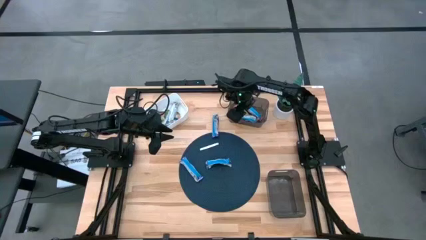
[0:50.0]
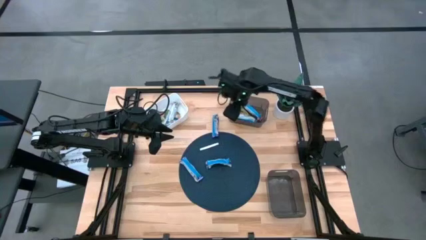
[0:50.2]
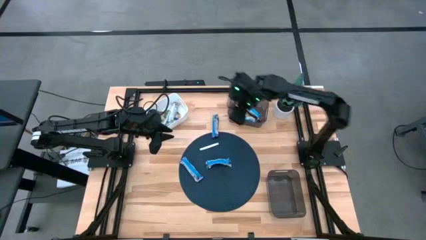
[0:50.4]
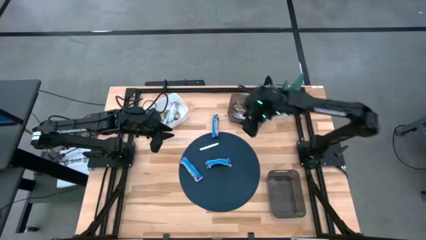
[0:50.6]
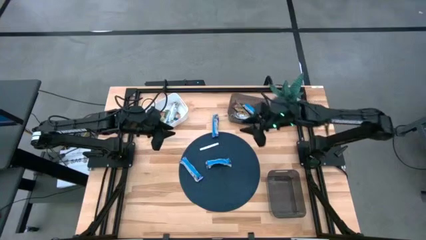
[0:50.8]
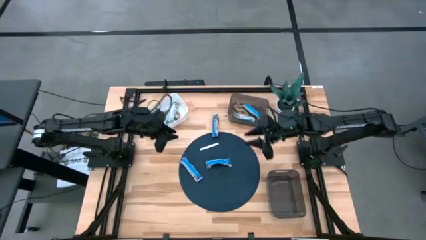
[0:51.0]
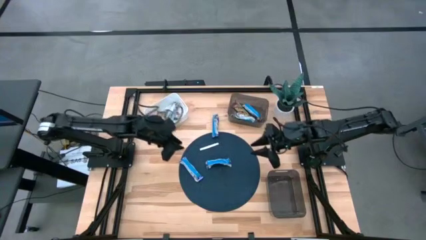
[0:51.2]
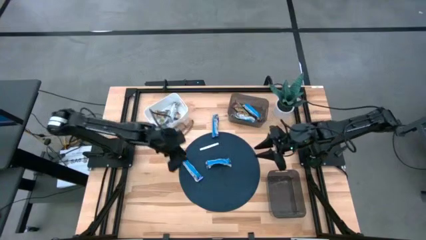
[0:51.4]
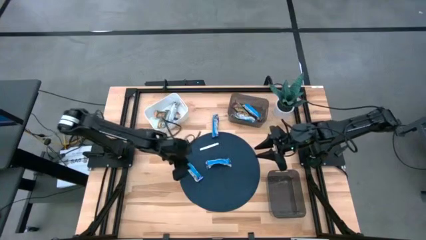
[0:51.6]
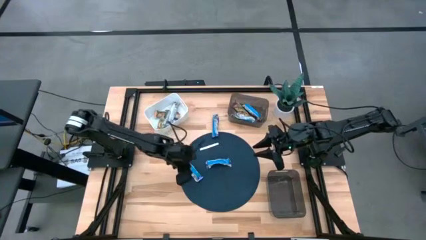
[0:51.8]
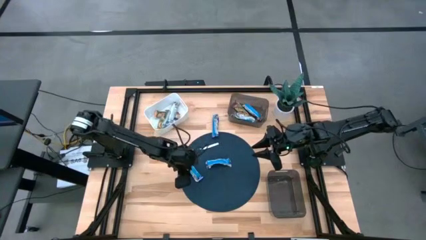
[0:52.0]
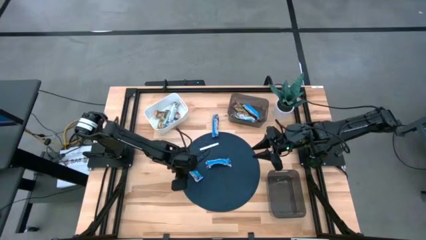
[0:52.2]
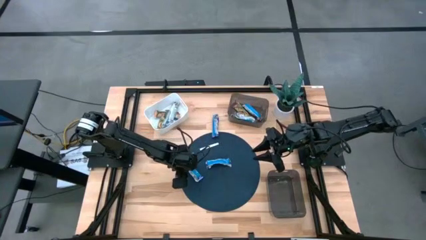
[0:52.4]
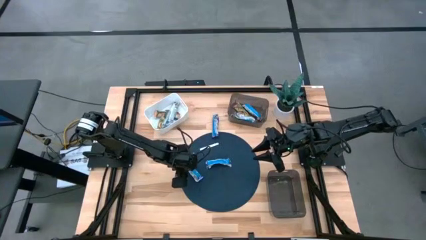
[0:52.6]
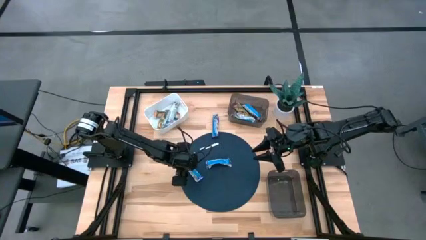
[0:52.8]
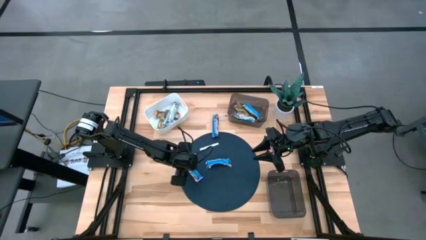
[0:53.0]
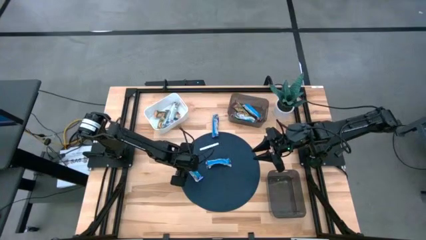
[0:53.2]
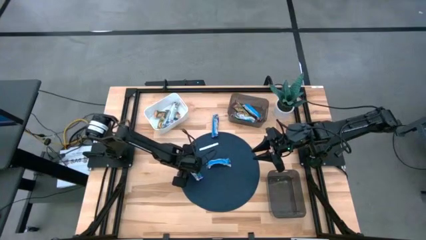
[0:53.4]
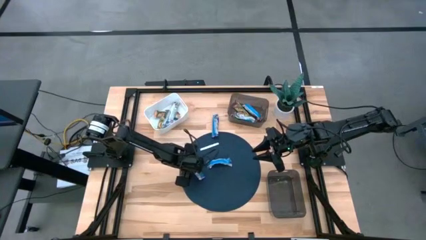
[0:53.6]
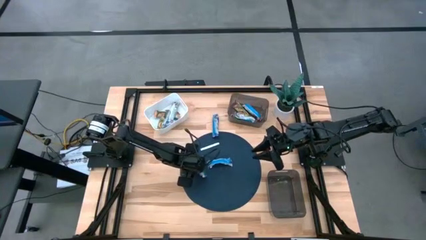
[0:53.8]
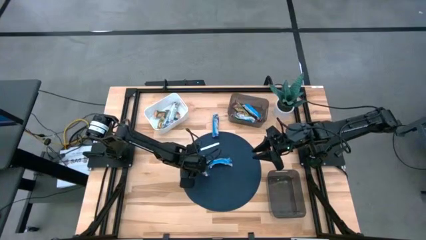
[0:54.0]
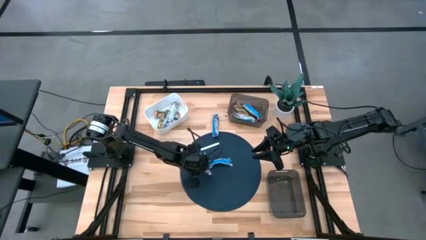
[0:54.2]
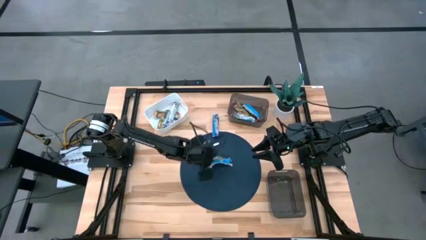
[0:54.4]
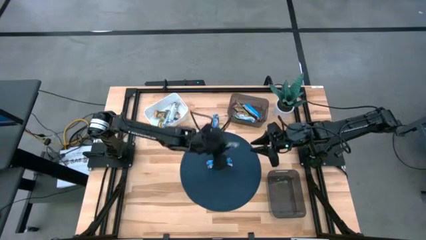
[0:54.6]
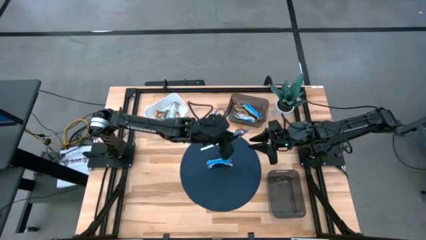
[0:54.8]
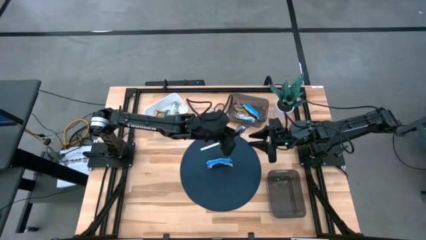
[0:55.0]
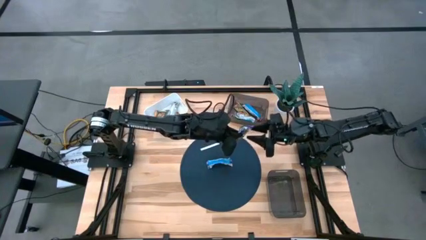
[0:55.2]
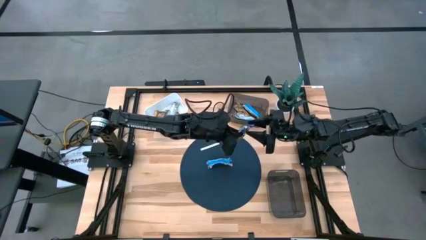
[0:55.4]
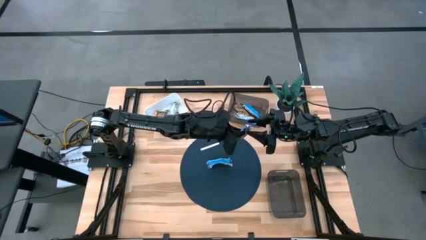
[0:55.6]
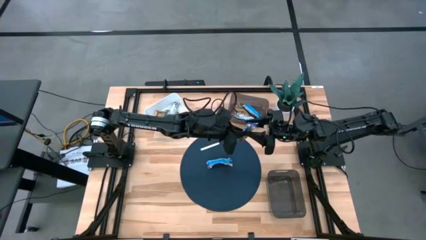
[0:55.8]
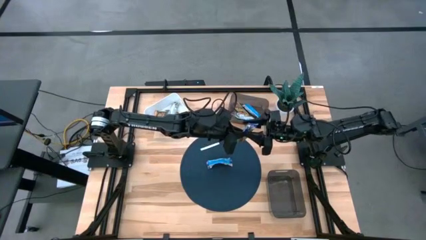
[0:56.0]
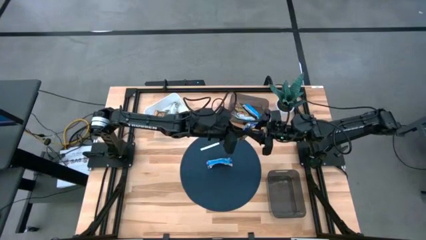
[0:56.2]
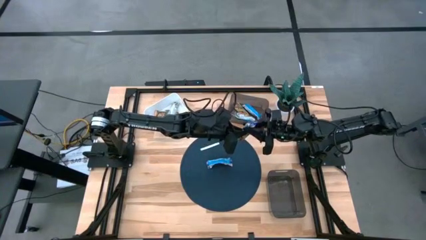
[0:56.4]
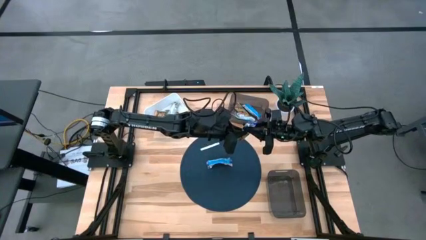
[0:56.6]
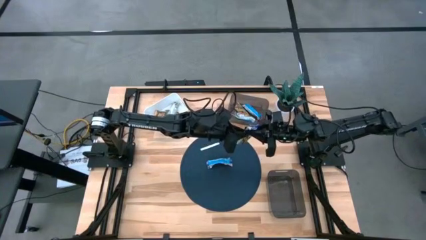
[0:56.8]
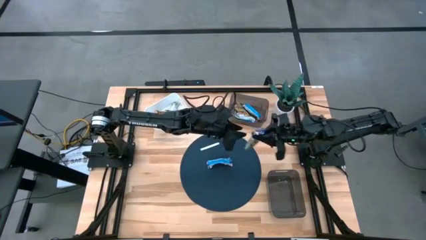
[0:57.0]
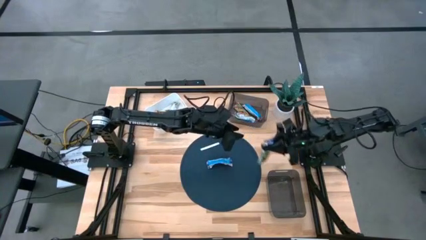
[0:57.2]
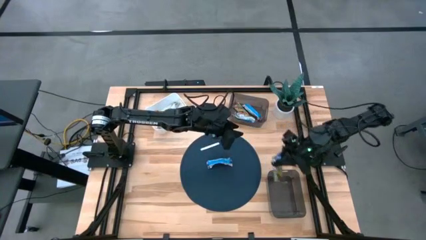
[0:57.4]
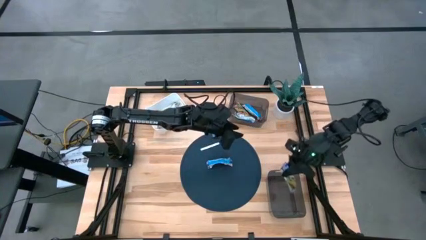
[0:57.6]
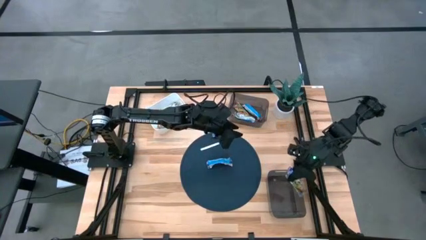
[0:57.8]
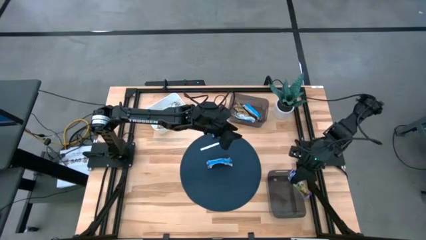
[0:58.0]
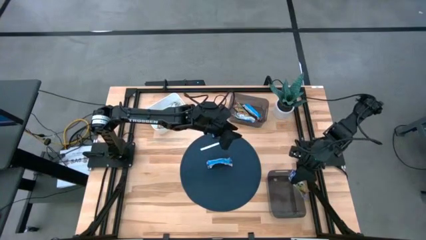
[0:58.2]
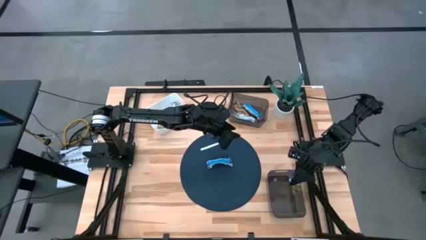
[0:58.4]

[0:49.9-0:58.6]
Task: Pick and place Granola Bars by type
Put the violet granola bar into the bottom black bin

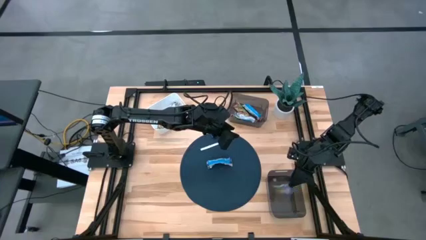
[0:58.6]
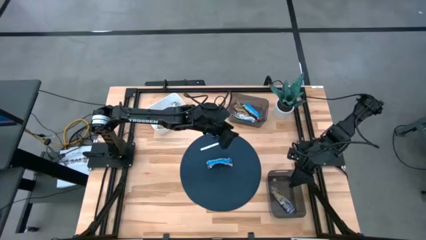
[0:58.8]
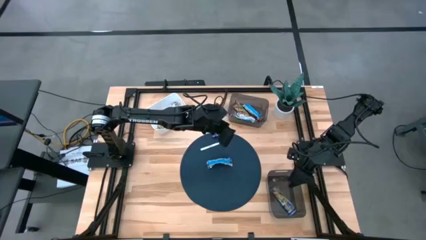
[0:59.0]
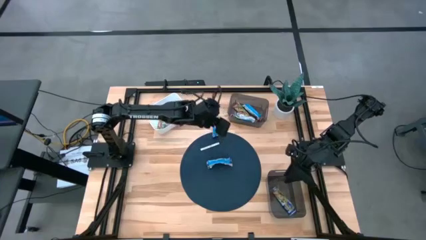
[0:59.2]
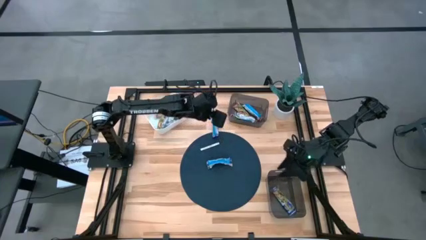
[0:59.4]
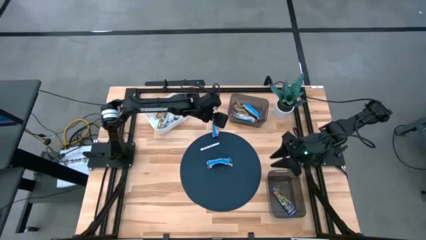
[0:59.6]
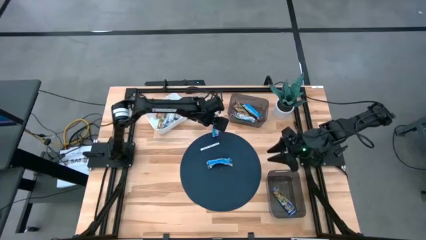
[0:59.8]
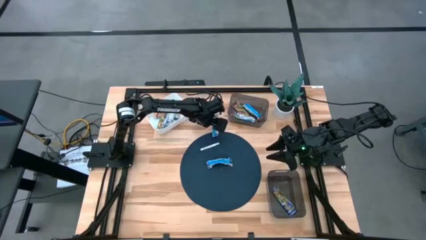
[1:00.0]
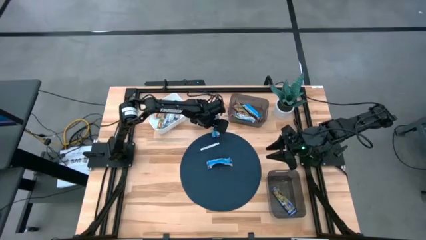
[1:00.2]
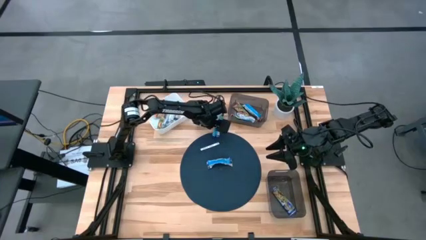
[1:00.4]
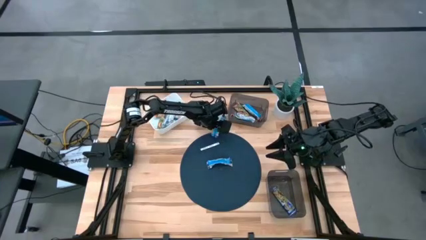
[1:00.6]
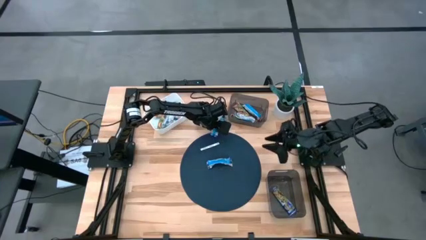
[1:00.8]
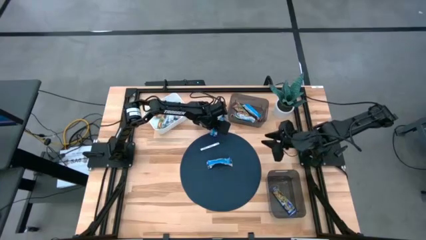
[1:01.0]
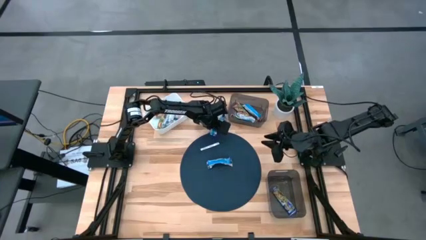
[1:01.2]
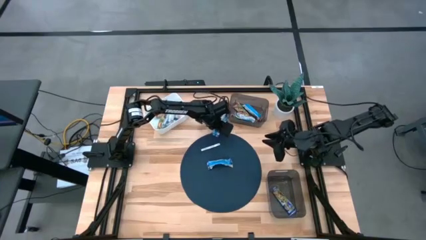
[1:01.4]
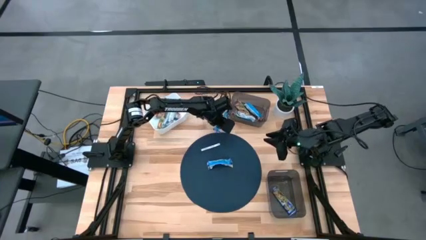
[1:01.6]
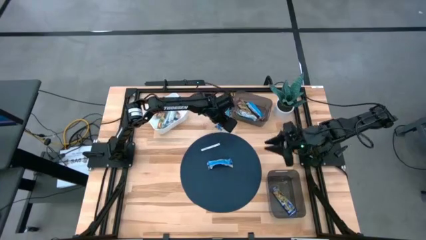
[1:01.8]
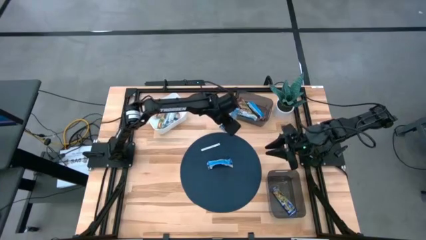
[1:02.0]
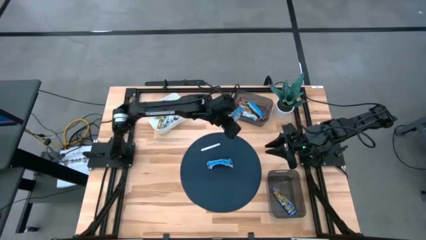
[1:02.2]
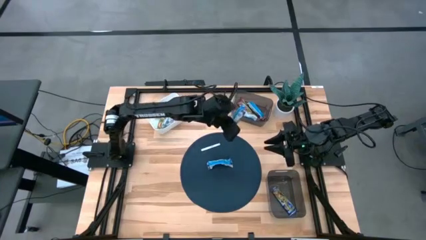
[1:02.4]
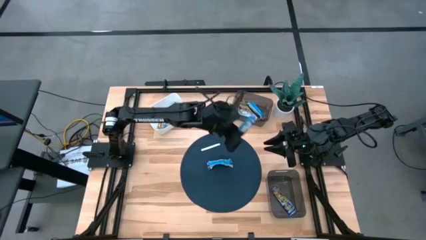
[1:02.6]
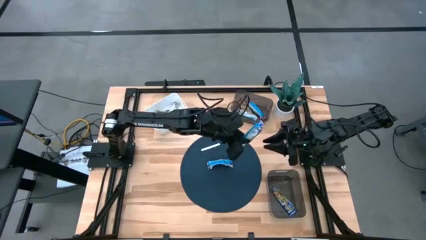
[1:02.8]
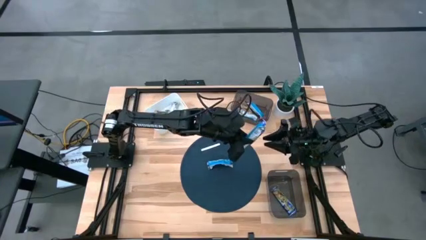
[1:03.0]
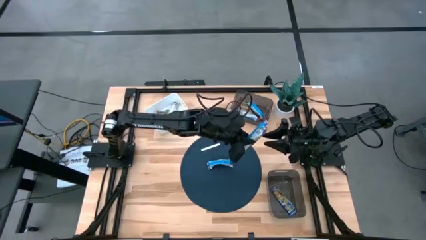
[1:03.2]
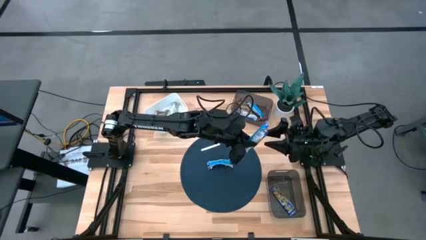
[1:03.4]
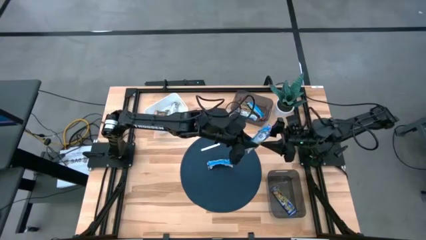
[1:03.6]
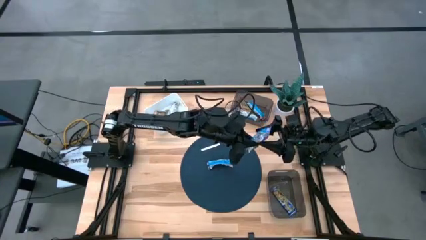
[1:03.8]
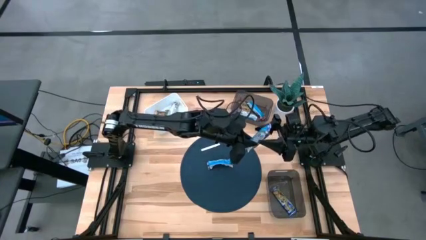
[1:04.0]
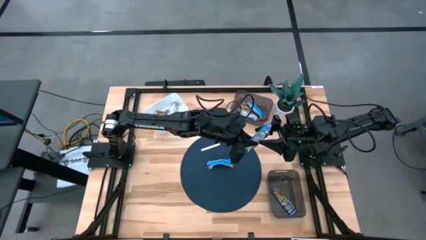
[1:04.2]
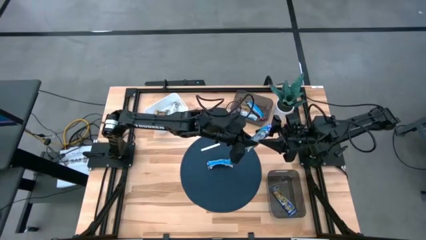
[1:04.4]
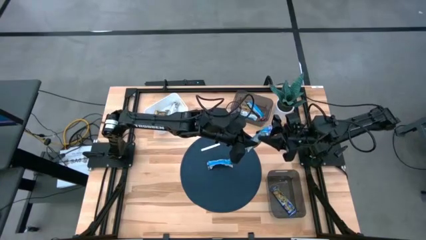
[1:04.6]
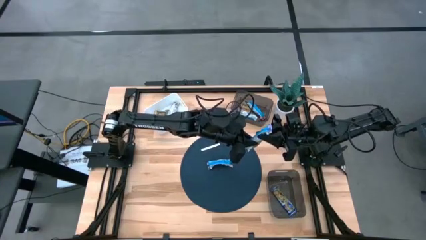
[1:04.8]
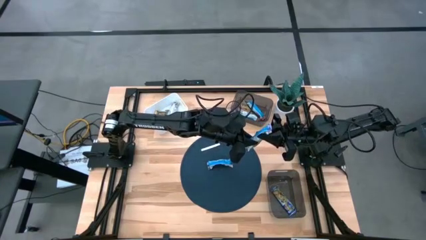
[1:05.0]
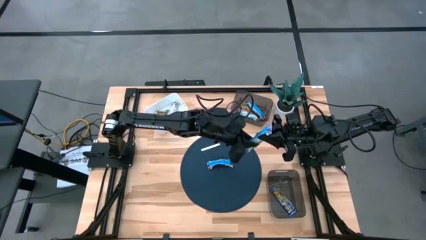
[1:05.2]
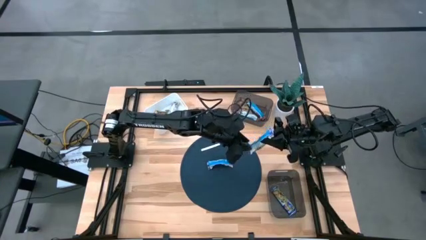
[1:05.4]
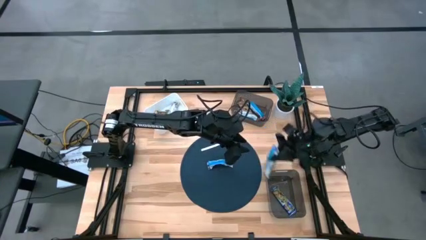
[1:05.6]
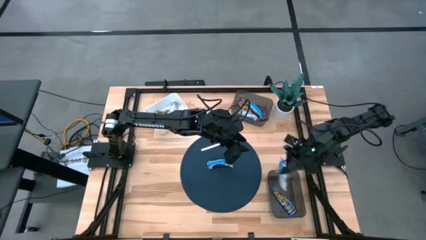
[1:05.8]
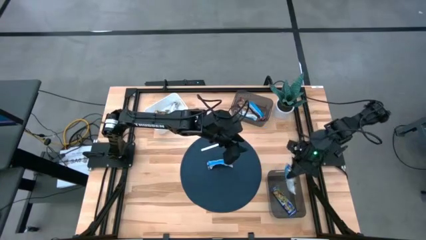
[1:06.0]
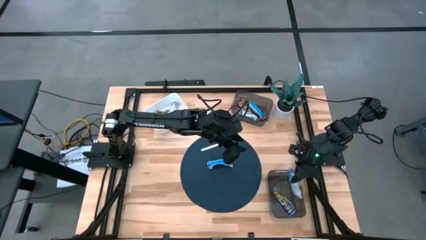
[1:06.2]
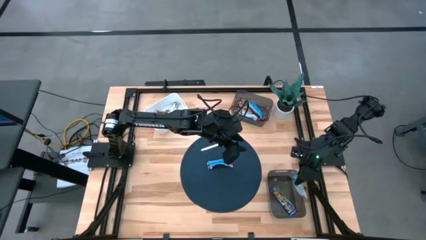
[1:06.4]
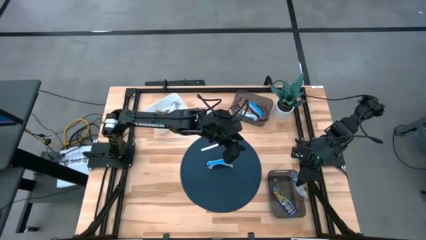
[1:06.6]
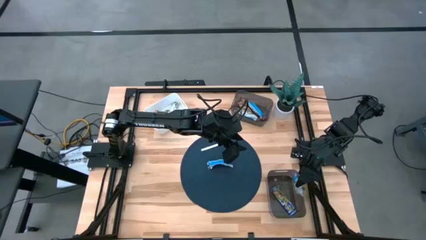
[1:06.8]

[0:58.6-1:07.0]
Put the violet granola bar into the bottom black bin
